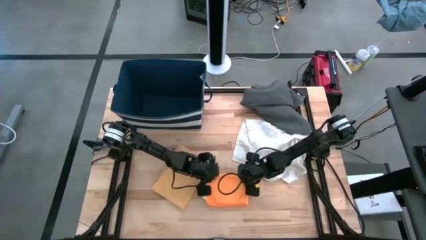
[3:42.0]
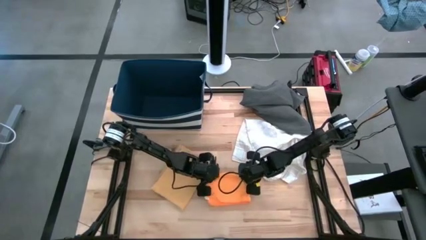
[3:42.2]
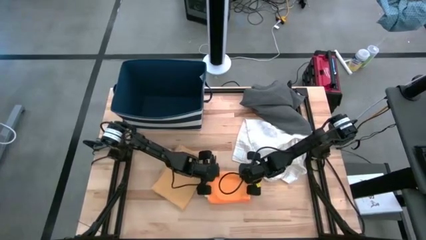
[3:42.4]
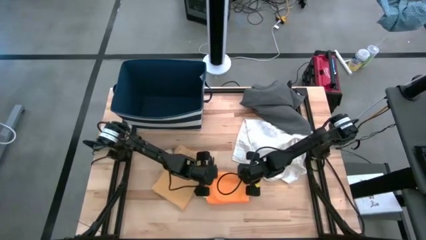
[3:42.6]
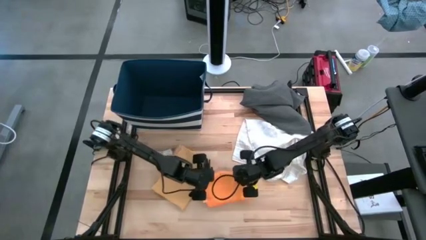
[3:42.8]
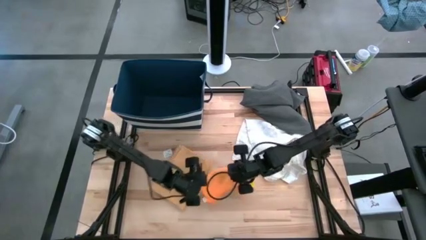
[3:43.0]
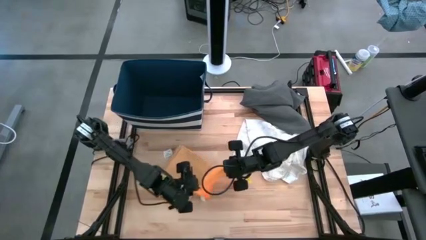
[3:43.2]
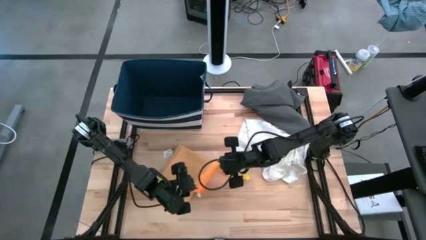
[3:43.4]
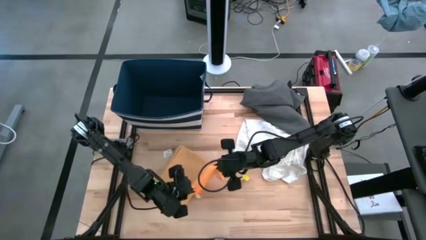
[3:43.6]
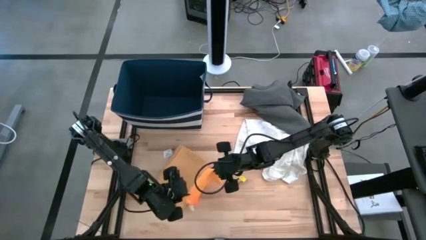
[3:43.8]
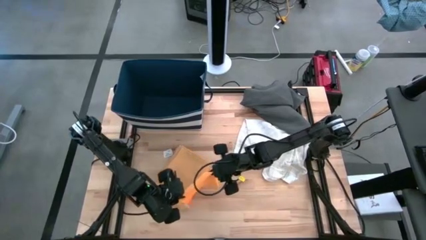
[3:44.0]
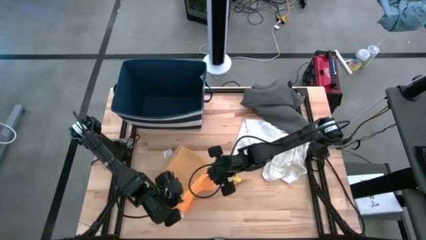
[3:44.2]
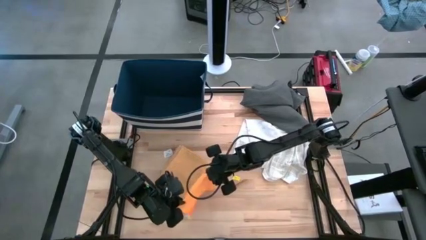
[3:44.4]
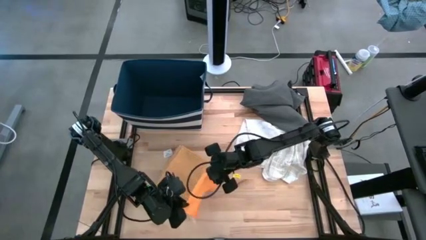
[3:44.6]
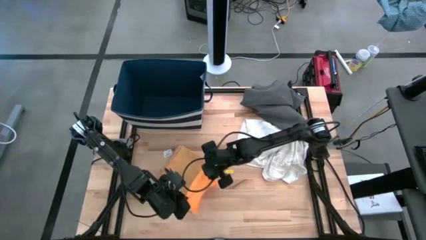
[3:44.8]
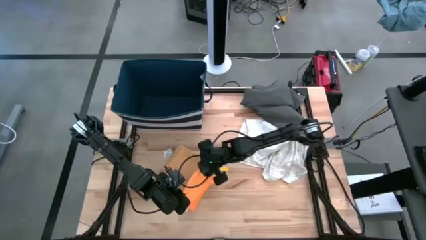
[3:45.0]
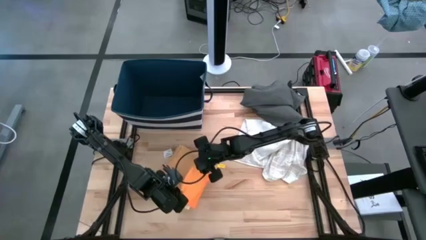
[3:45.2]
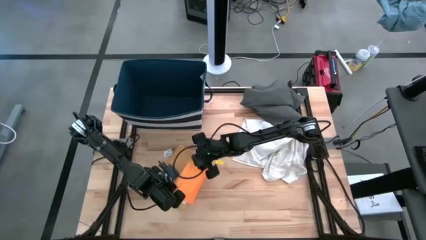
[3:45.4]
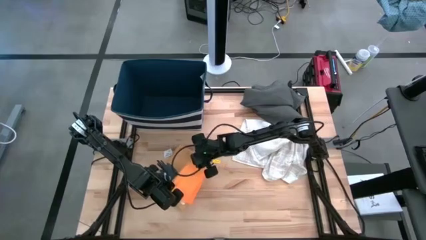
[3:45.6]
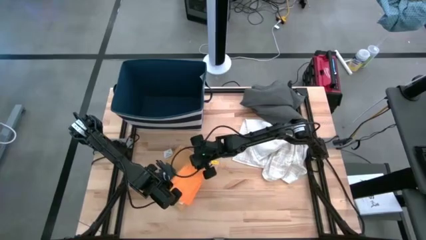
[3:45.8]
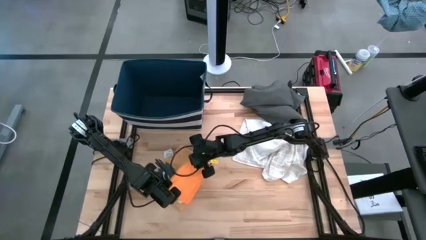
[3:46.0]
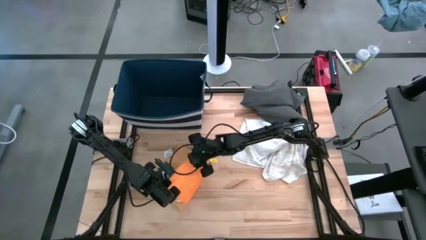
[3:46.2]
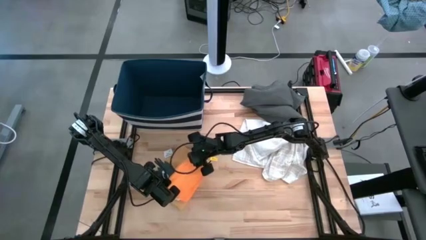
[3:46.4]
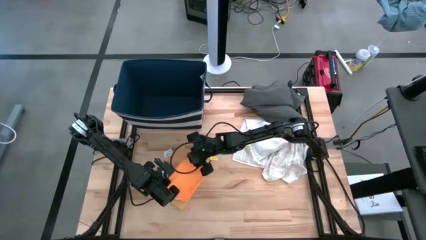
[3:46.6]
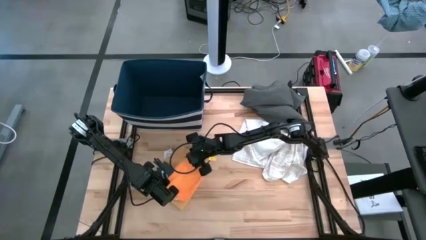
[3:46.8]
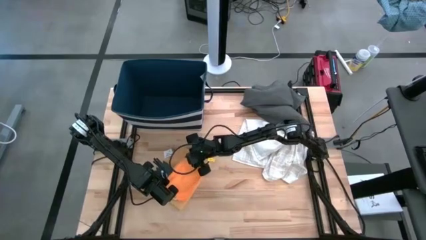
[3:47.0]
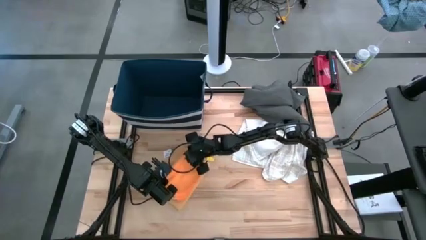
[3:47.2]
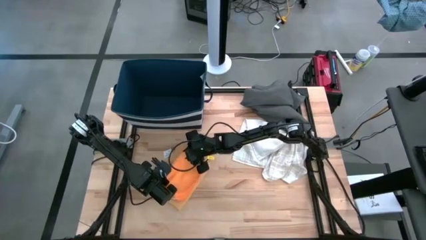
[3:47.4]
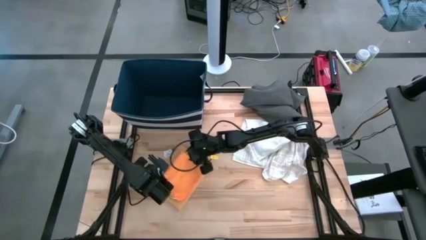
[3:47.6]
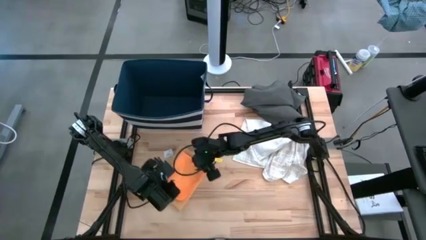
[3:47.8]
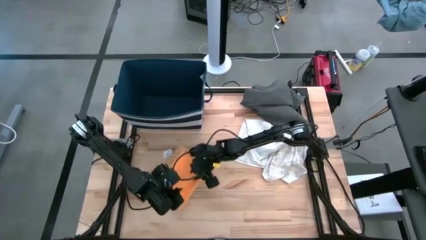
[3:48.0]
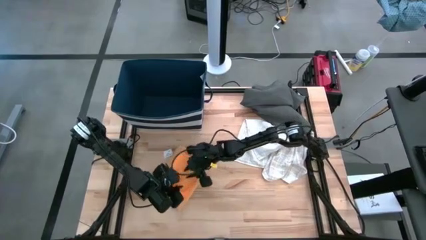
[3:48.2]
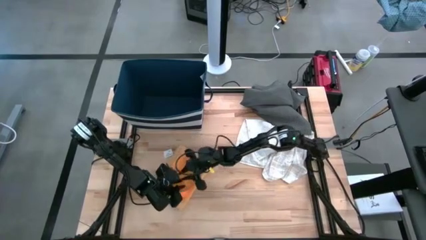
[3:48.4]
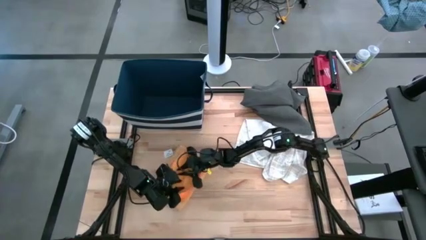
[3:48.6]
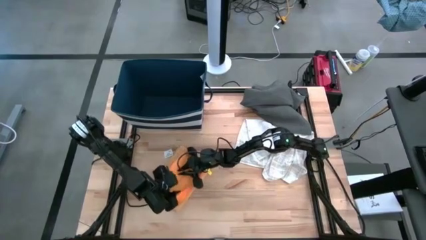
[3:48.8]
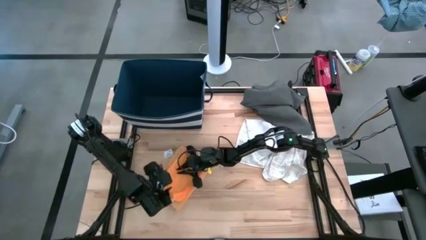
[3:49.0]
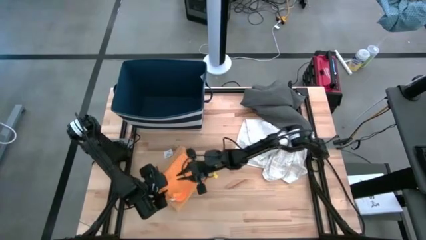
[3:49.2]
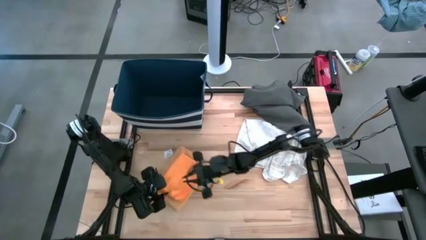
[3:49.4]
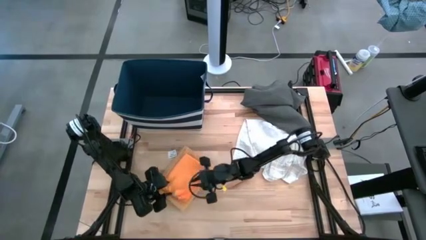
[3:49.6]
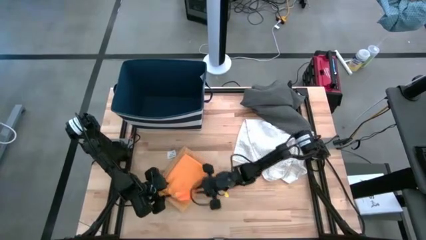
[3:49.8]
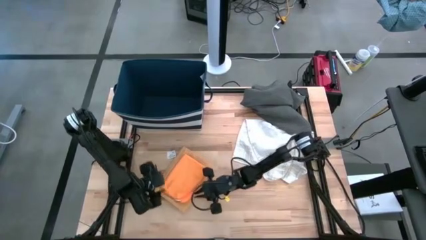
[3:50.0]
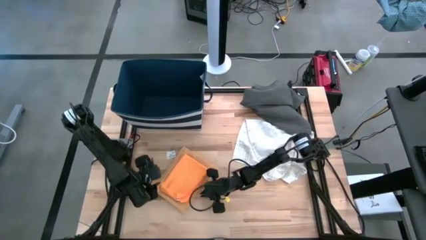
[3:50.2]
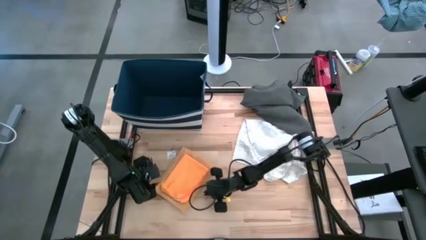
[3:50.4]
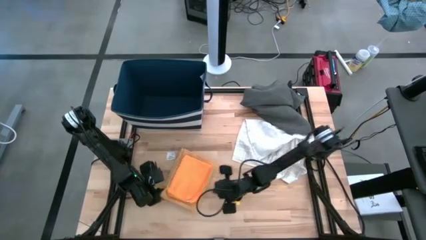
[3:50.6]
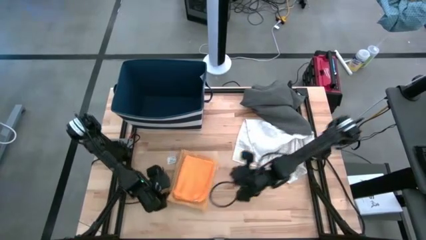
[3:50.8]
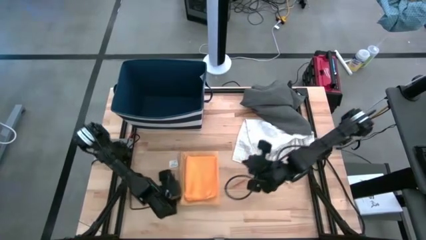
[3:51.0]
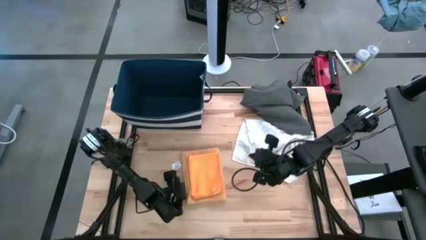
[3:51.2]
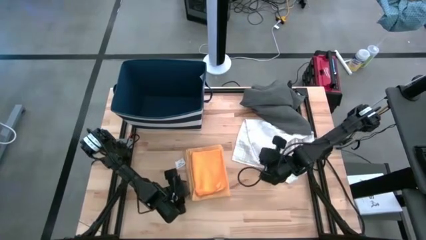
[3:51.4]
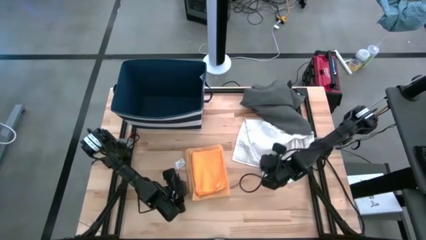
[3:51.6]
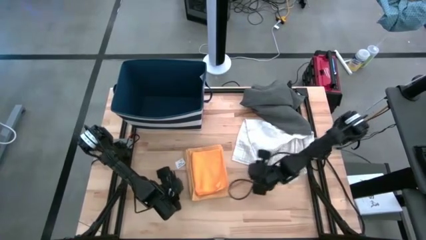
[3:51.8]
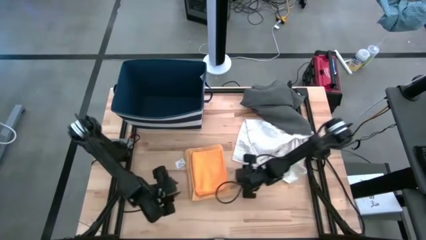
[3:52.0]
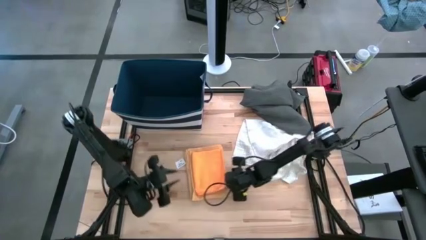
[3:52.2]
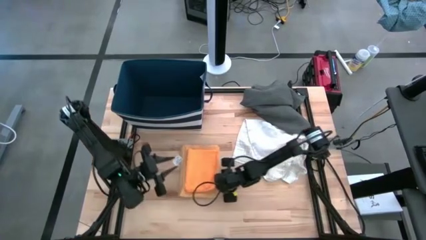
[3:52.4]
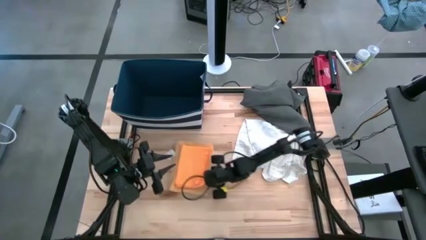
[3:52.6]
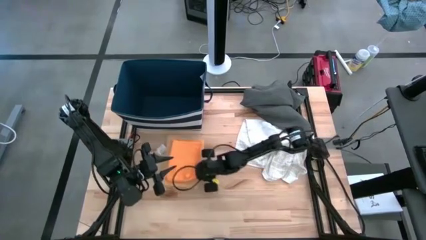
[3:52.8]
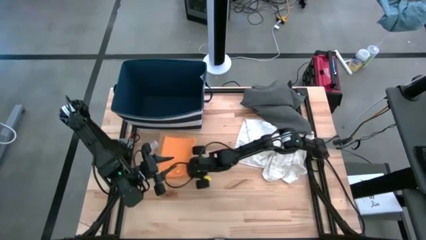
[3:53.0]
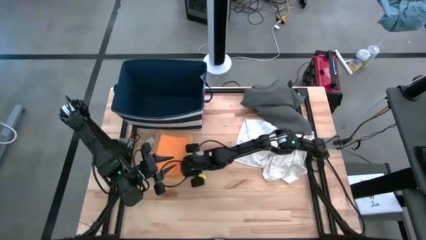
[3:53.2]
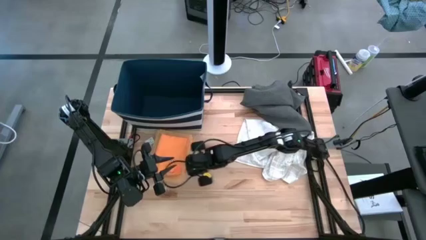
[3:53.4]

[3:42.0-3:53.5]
Task: Fold towel
Stack the orange towel on top of the yellow towel

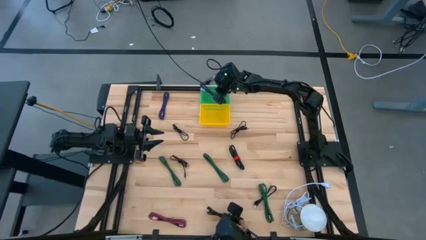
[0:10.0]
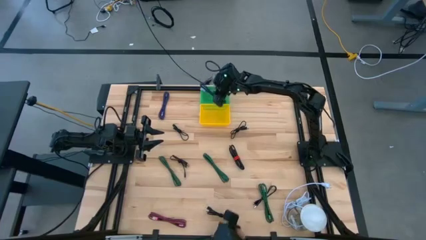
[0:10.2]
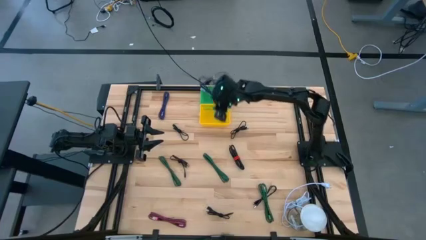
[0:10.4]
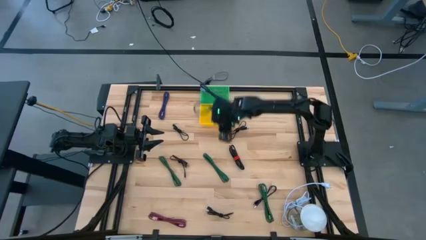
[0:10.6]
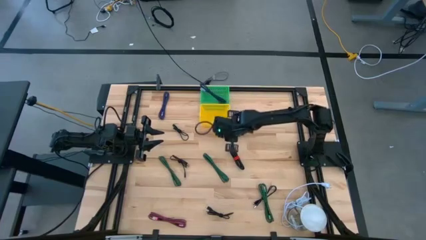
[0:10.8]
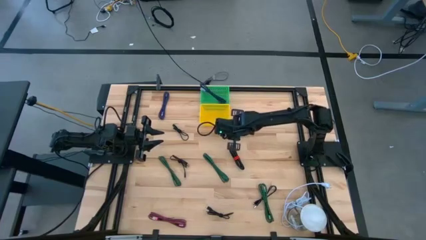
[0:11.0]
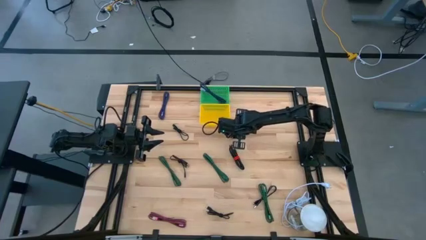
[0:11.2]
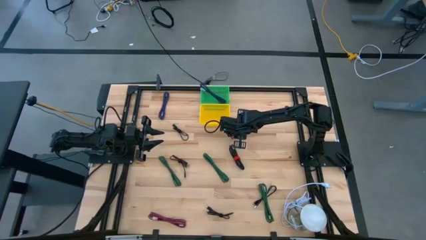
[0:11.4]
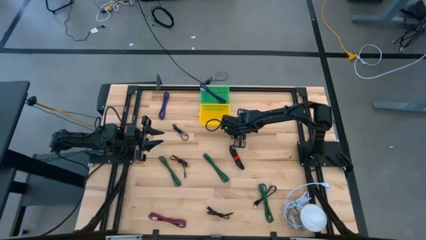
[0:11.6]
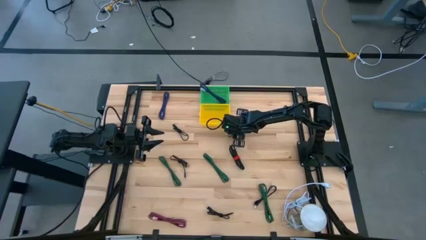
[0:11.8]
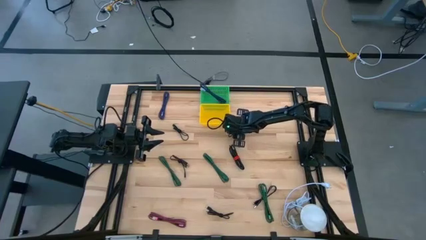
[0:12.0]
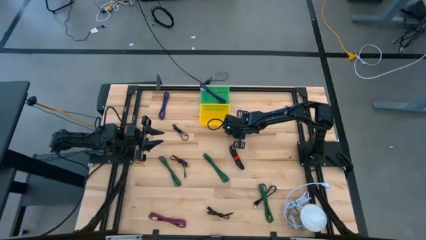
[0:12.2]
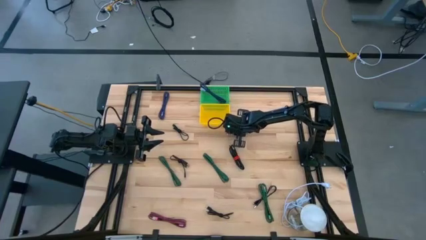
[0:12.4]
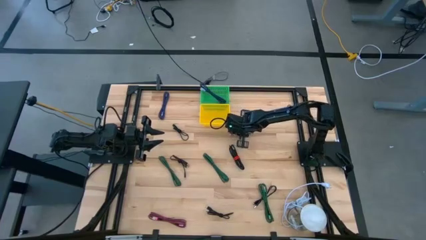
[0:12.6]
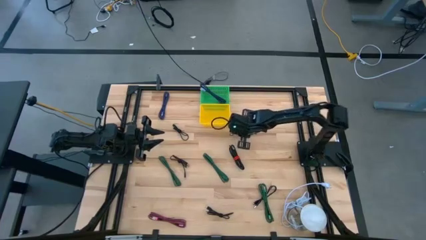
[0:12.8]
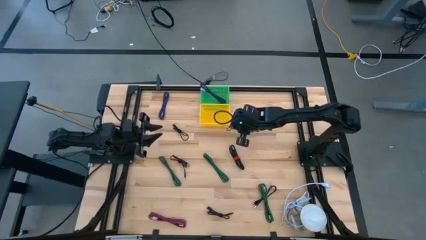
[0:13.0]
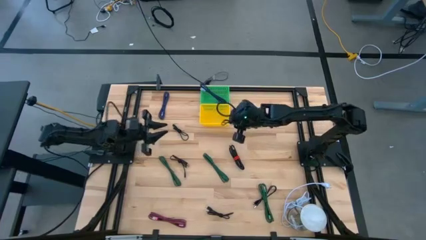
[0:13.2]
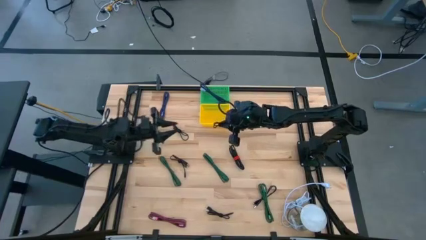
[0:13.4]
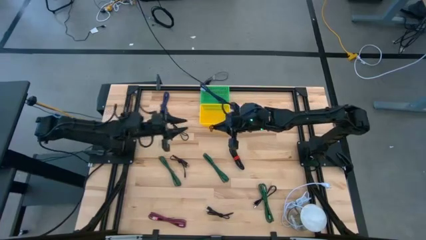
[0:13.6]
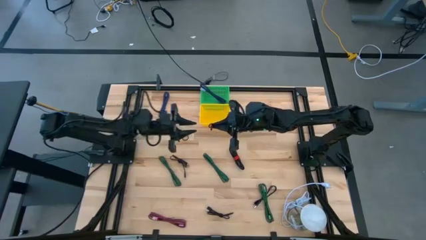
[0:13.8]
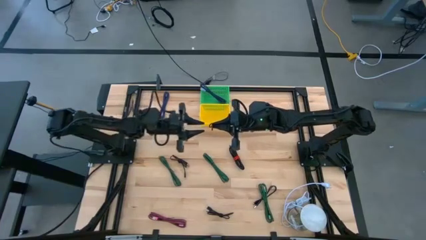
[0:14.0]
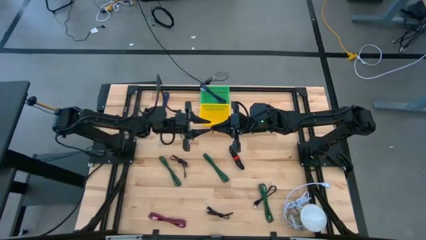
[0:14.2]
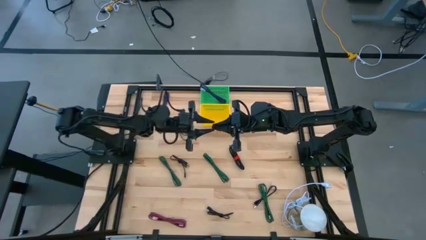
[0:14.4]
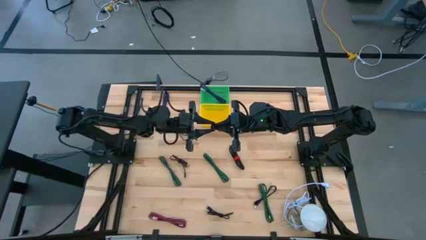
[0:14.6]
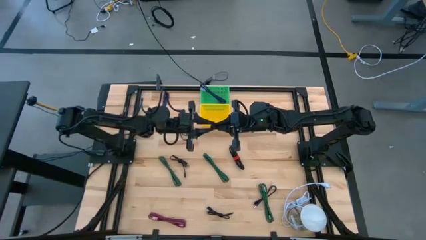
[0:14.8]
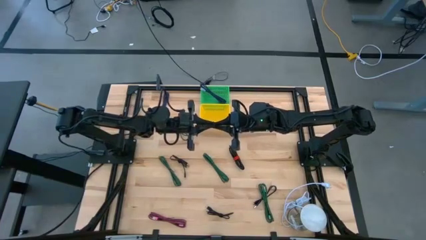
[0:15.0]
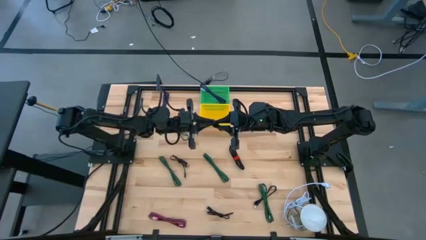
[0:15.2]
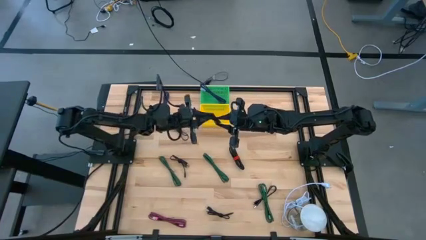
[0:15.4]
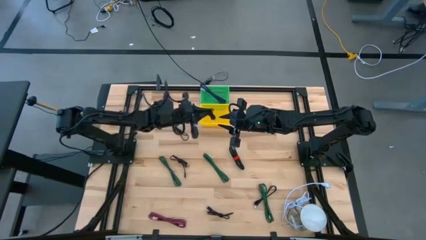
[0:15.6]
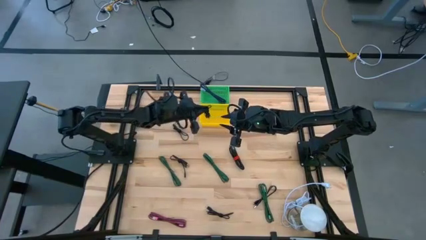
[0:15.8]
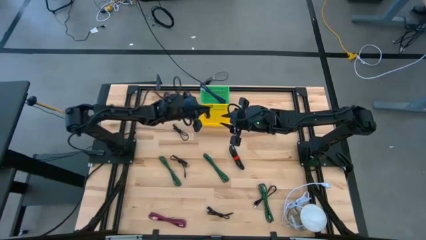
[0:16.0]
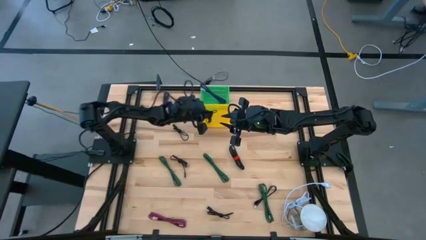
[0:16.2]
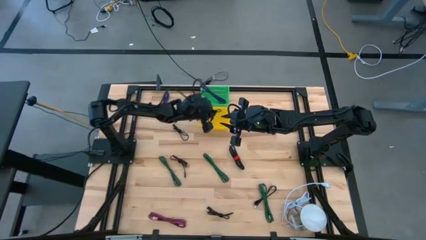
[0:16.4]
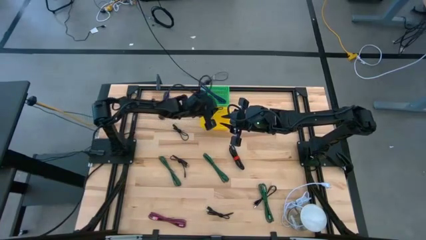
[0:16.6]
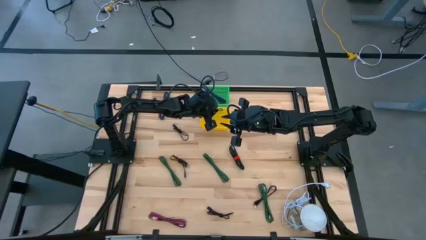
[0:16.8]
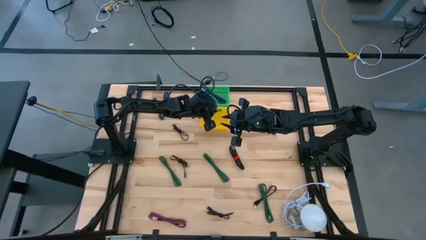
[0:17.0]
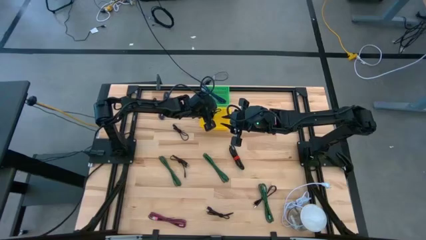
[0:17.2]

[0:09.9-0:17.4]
Task: Pick & Place USB Port
Put the black charger cable into the yellow basket
